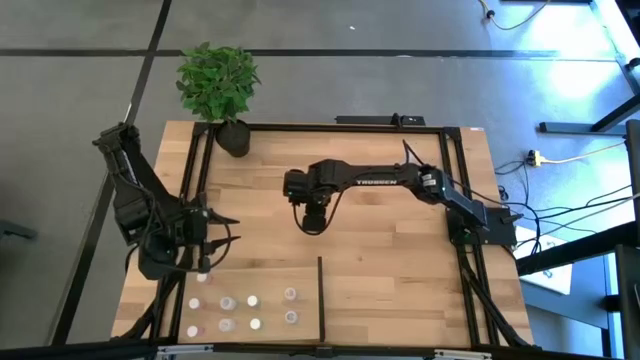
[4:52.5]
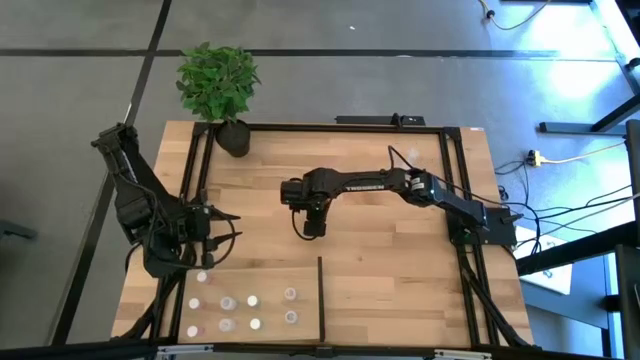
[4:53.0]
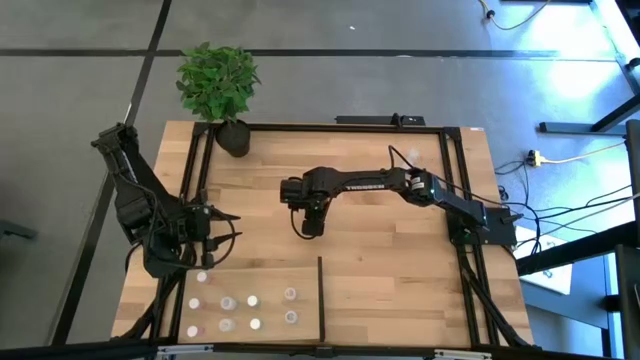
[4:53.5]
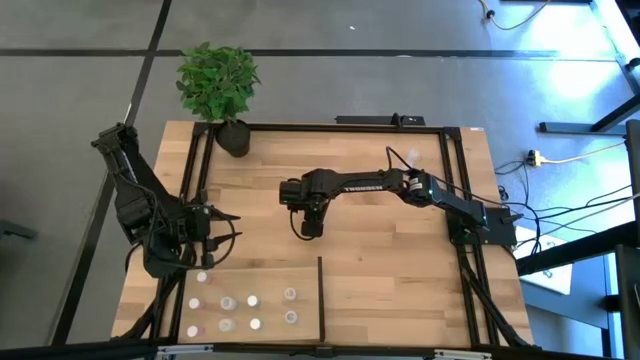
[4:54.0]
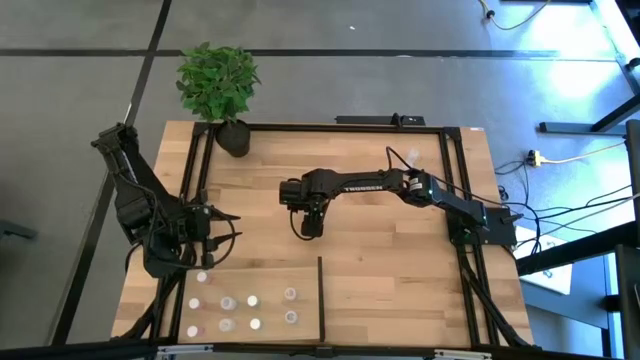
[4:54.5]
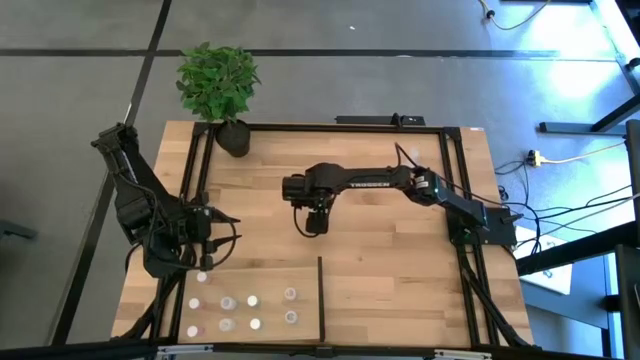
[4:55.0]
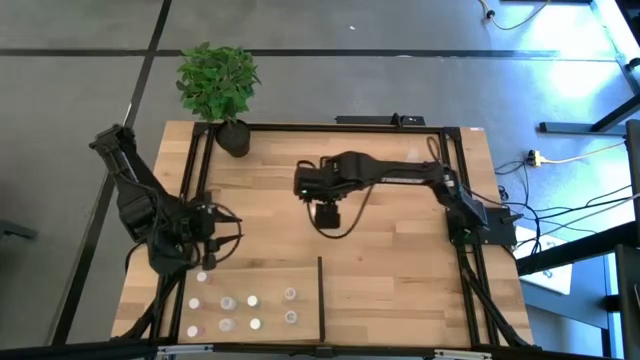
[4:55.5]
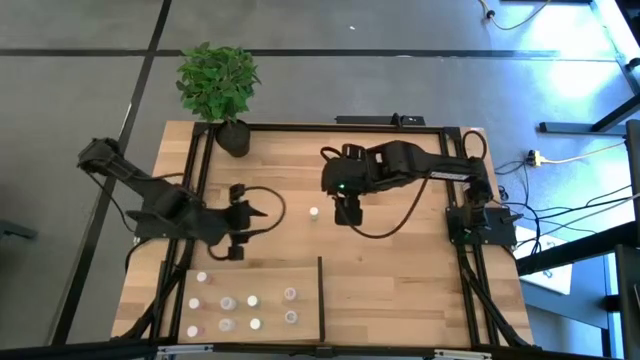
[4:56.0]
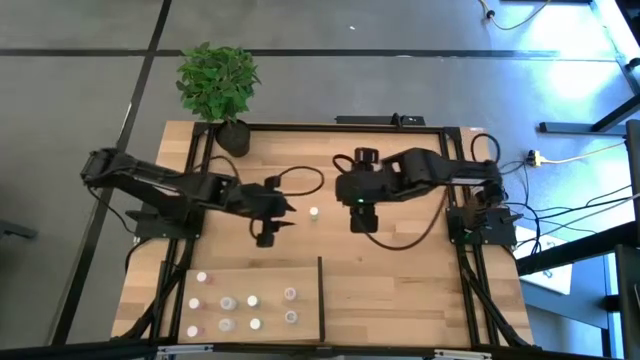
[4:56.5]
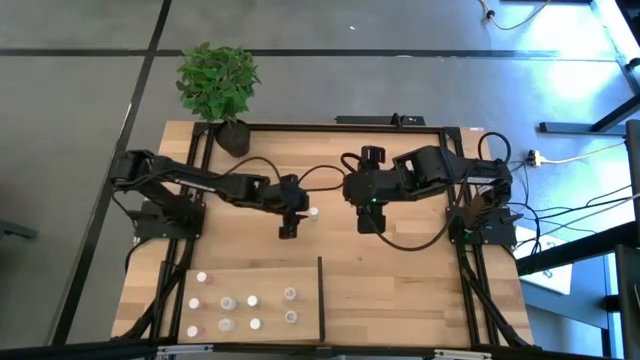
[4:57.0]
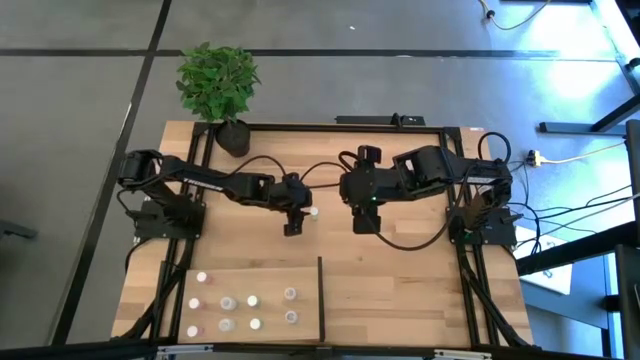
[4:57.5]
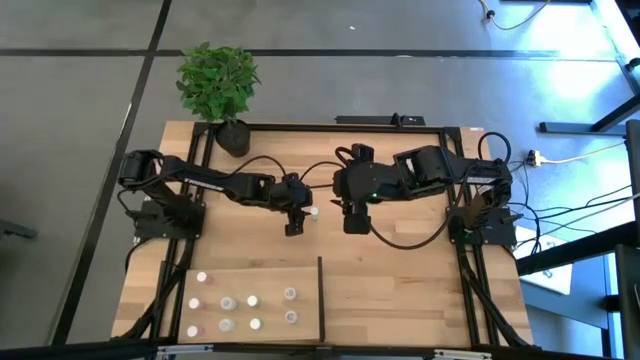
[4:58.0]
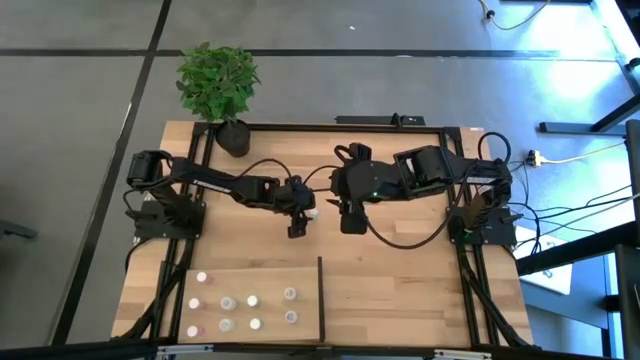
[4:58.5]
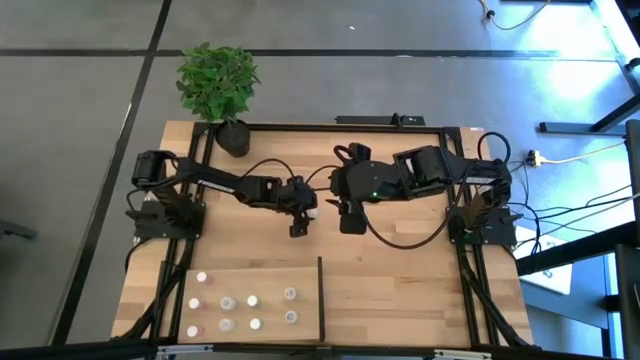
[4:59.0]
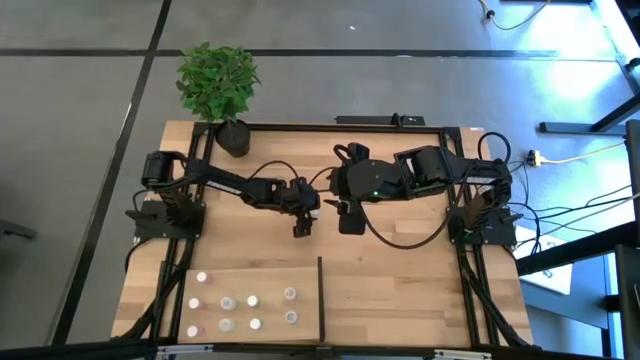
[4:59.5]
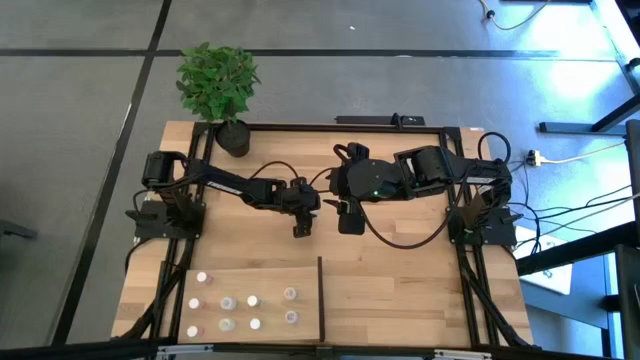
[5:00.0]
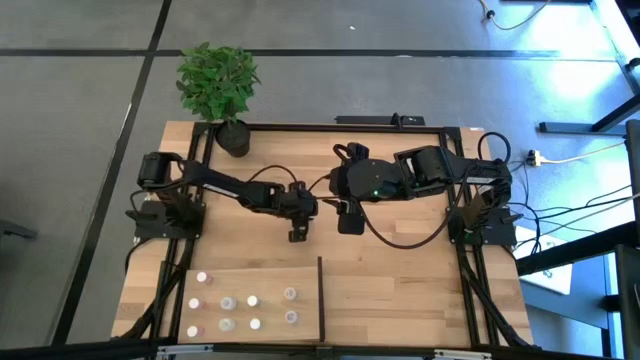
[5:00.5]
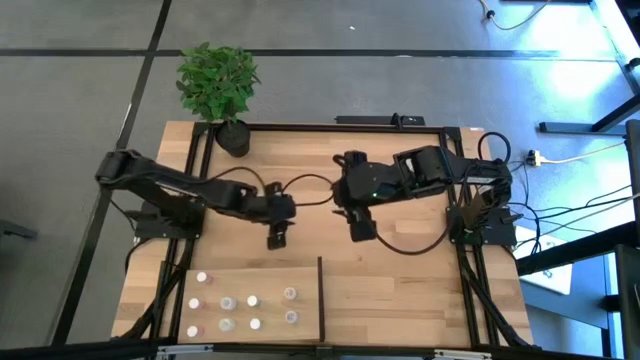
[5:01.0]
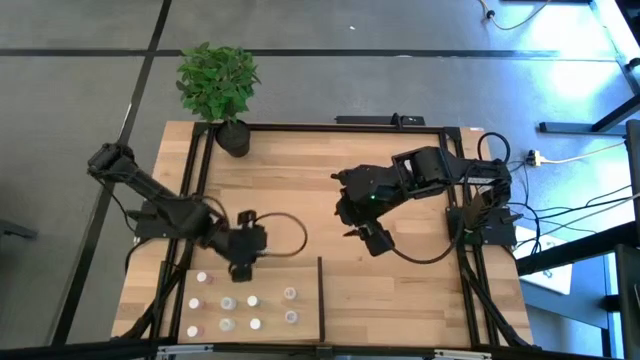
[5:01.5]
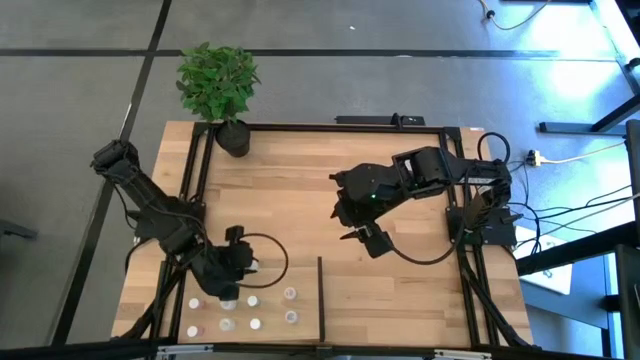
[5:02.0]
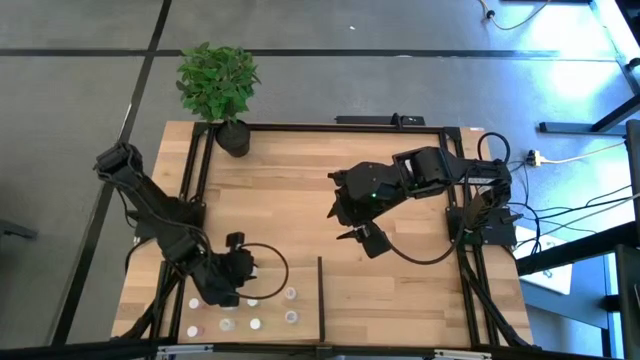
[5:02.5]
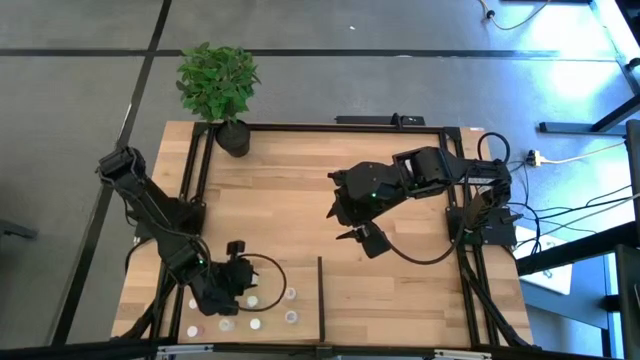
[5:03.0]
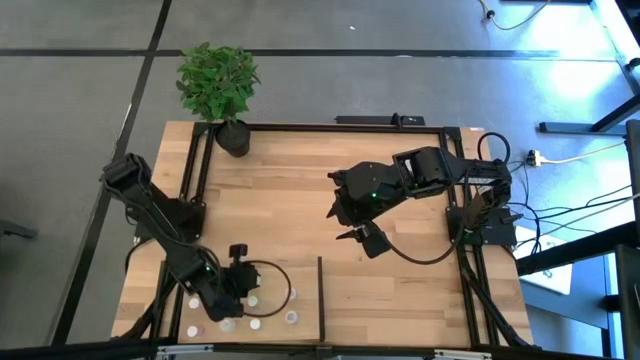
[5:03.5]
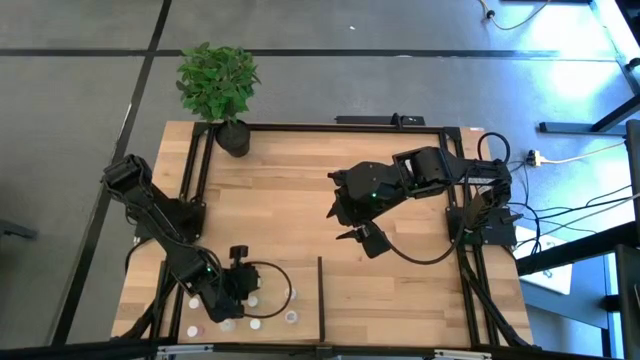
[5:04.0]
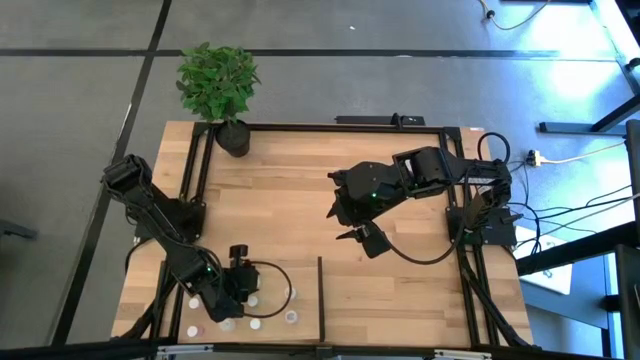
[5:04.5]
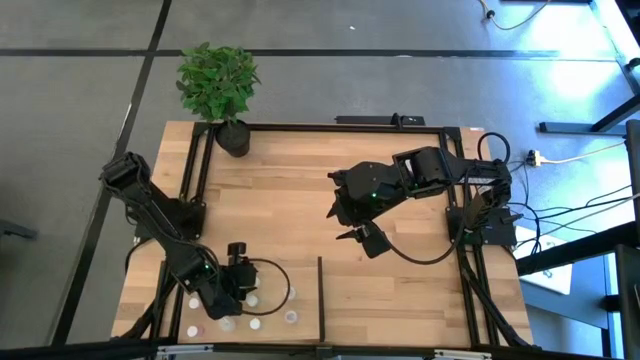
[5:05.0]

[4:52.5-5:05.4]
Task: Pick and place medicine bottles onto shelf by color
Put the green pill bottle on the shelf aligned with the other green pill bottles

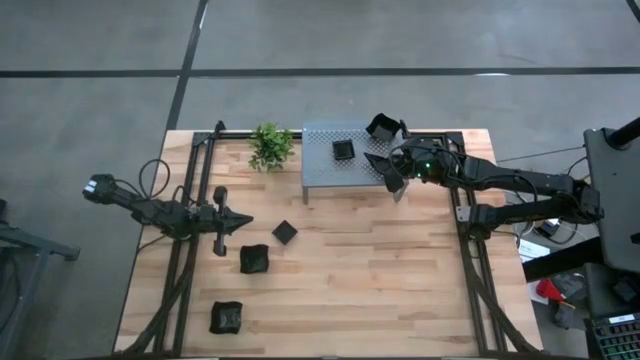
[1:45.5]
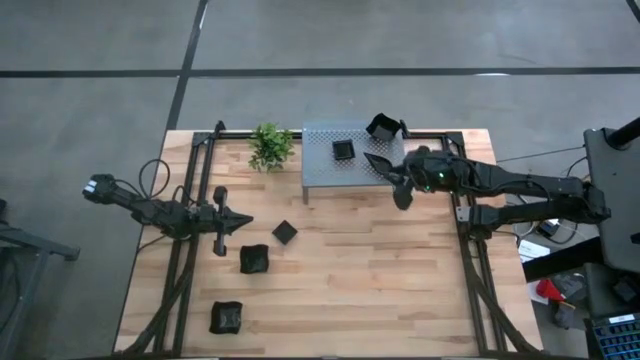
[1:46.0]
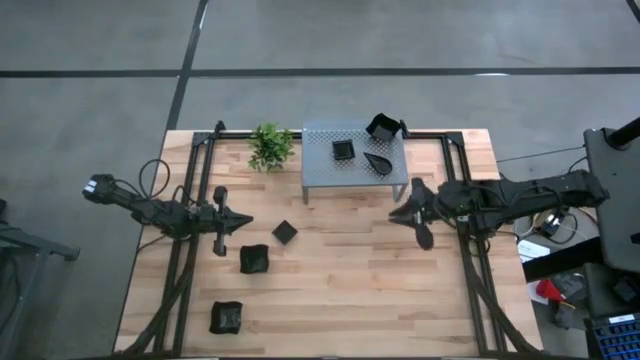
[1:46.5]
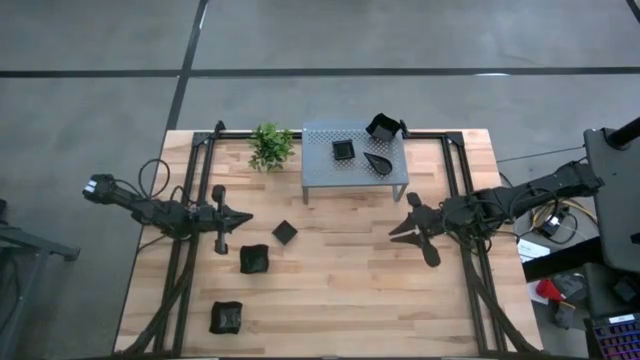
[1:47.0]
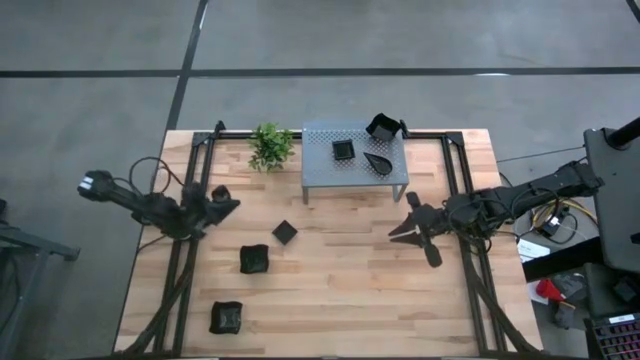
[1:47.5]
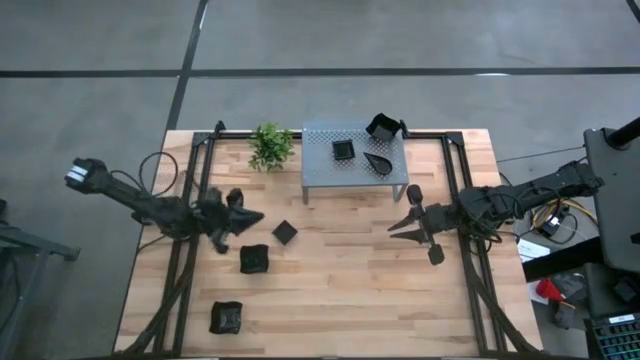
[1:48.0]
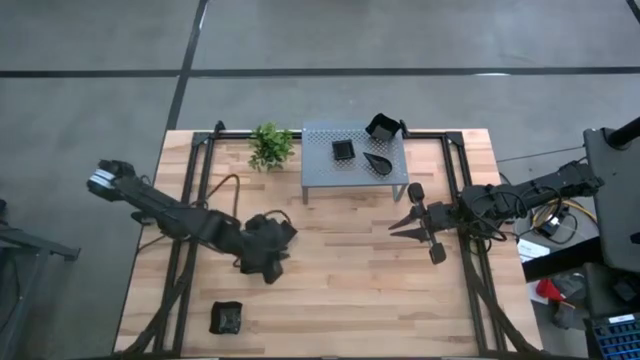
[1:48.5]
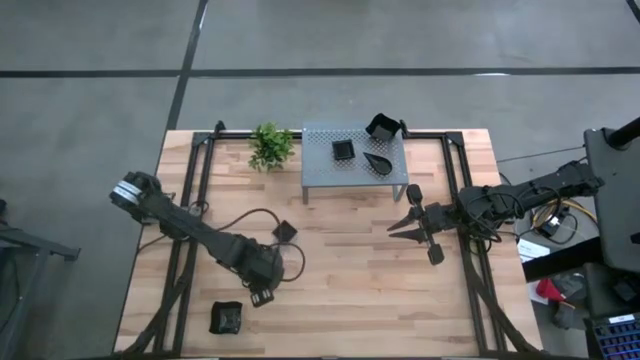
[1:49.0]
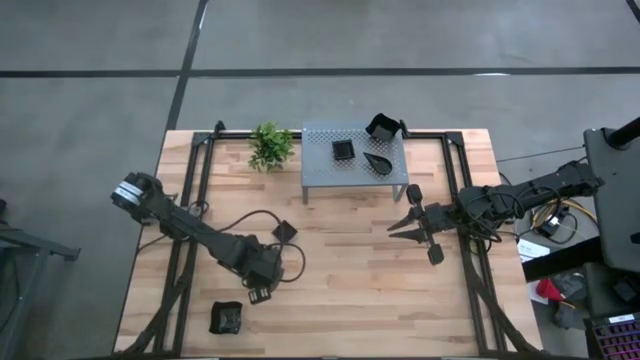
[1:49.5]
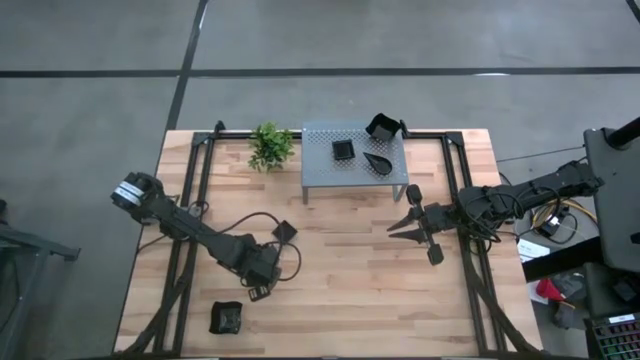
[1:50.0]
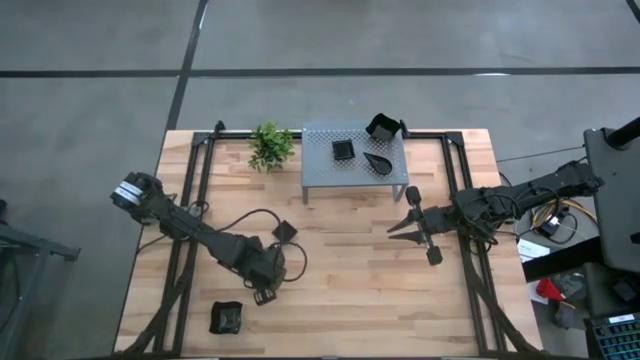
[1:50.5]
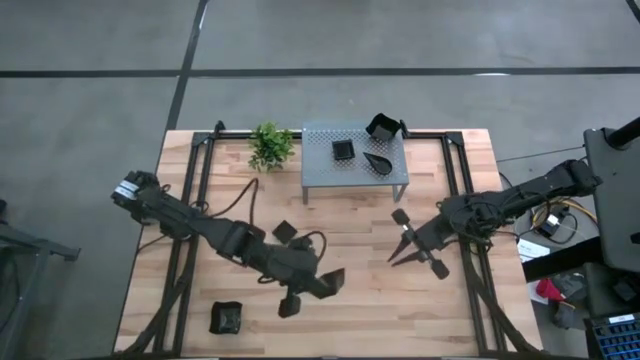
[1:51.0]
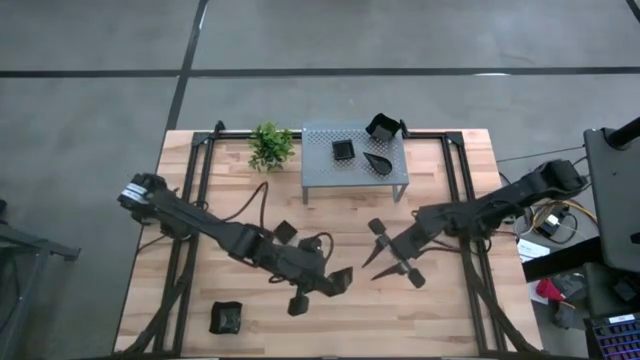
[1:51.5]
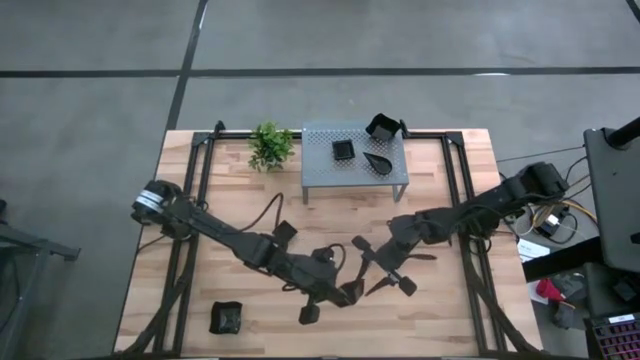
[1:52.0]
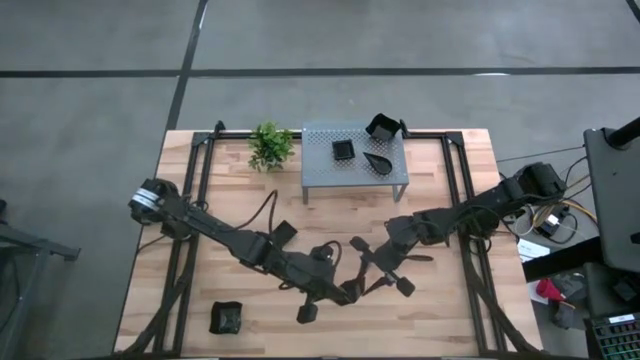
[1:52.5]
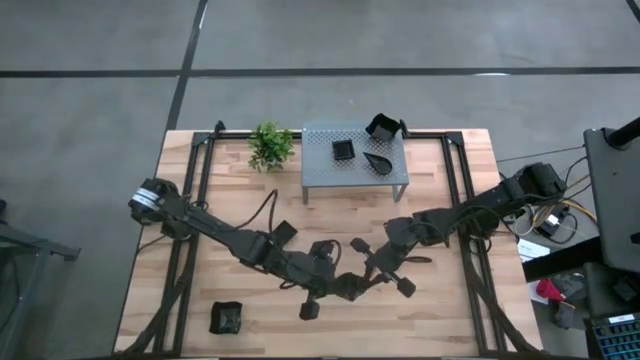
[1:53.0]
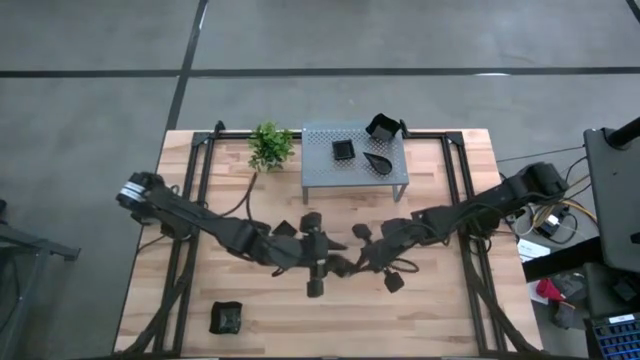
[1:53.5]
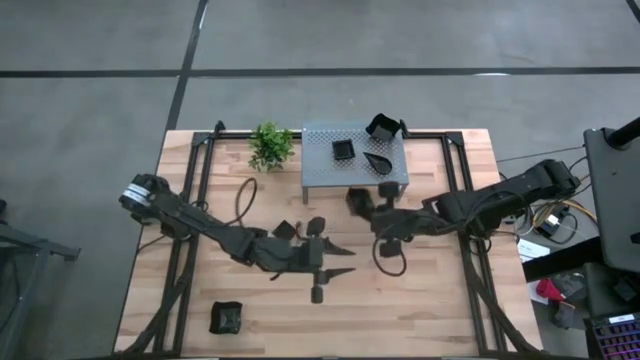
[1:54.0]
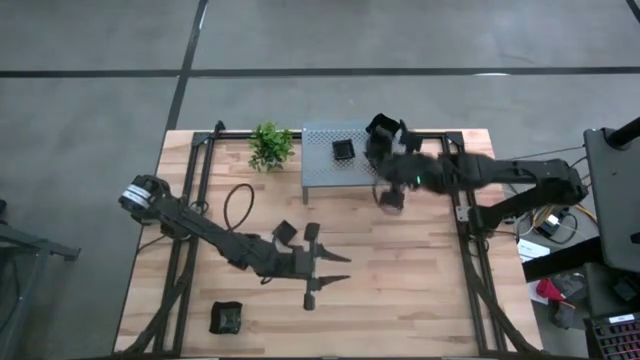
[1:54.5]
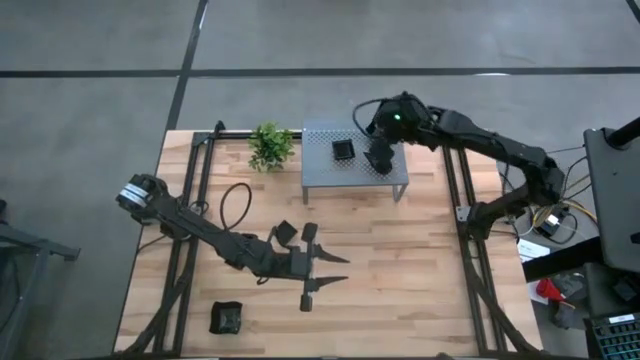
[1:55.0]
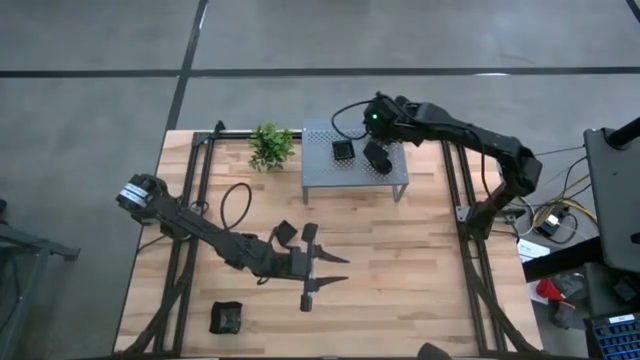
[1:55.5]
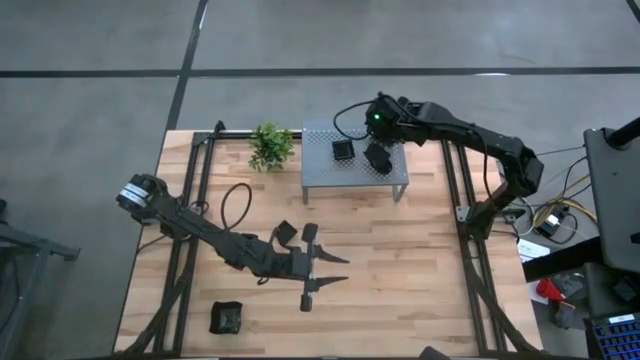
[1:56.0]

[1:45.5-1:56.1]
Task: Pick & Place Mini shaped plates
Stack the distorted square plate on top of the other distorted square plate on the shelf
